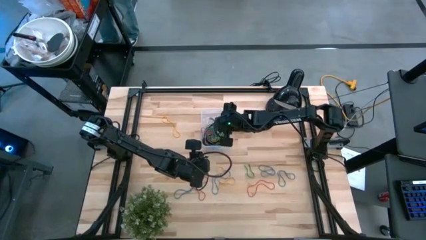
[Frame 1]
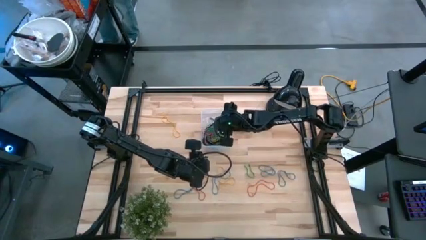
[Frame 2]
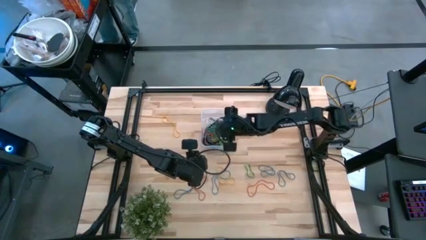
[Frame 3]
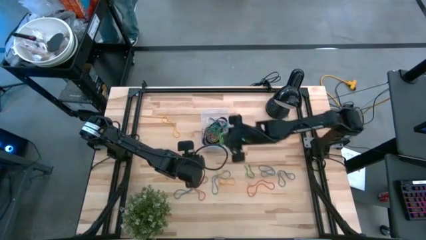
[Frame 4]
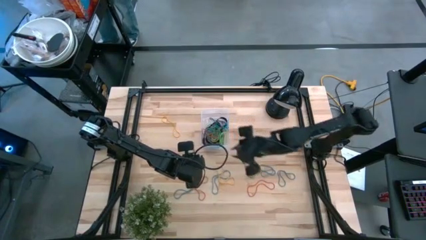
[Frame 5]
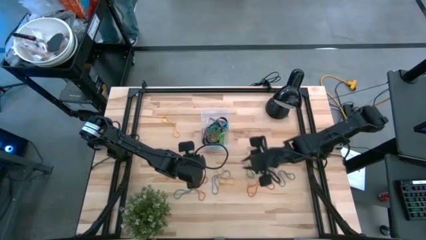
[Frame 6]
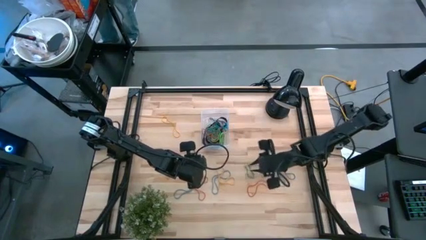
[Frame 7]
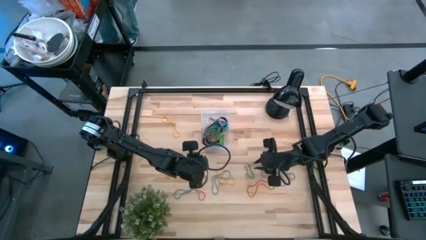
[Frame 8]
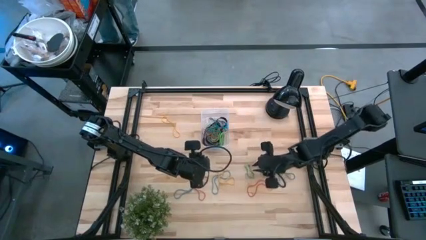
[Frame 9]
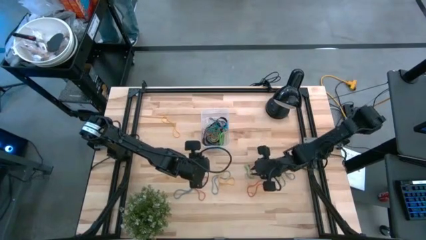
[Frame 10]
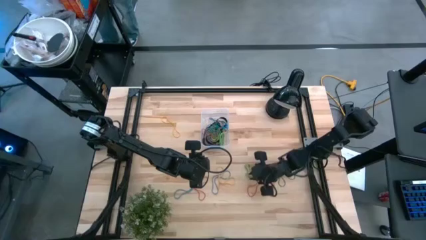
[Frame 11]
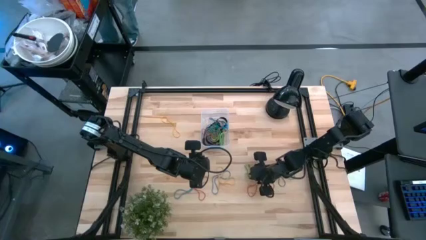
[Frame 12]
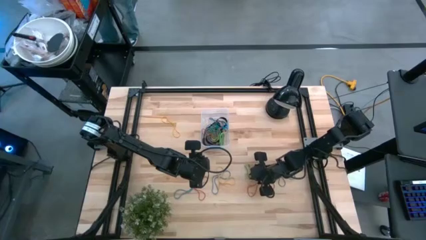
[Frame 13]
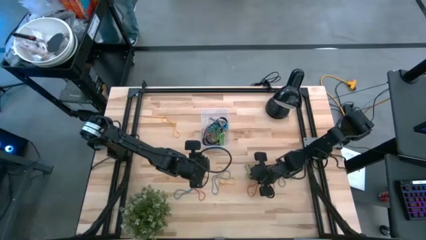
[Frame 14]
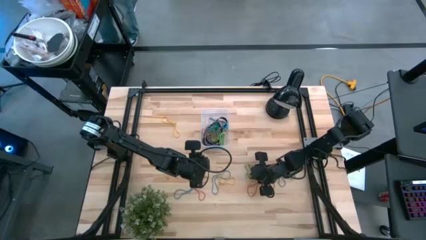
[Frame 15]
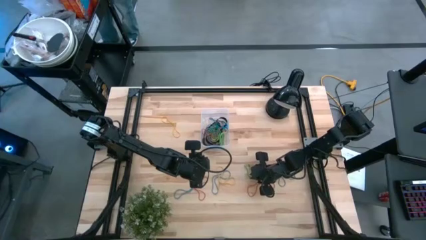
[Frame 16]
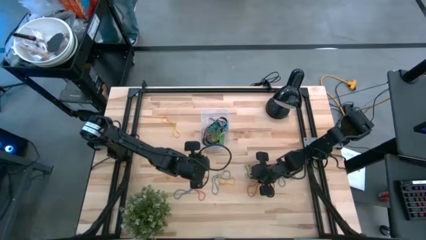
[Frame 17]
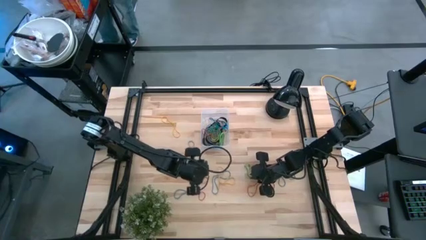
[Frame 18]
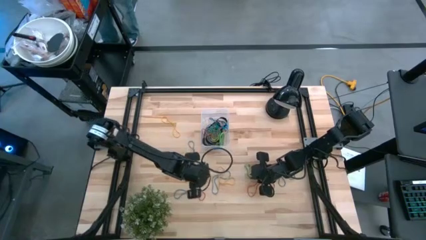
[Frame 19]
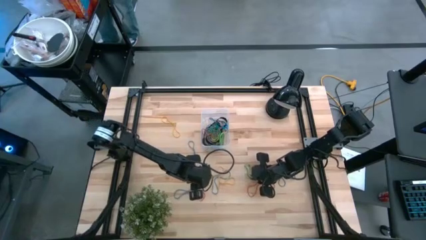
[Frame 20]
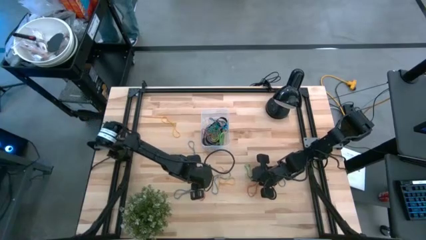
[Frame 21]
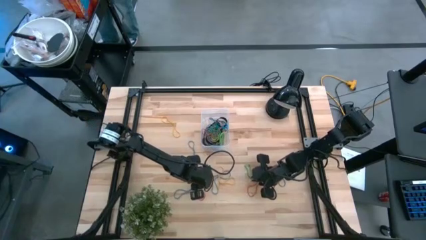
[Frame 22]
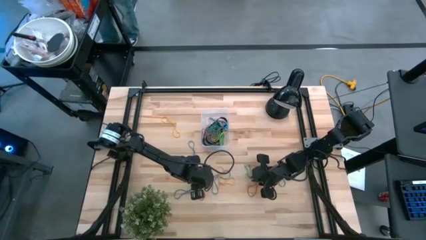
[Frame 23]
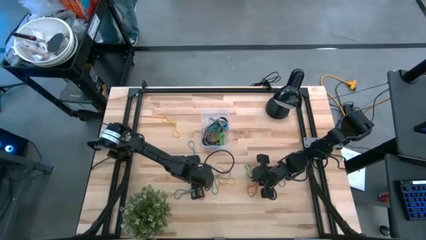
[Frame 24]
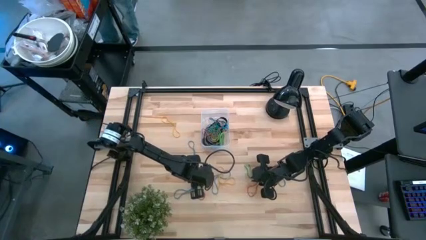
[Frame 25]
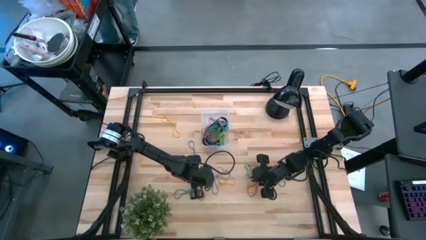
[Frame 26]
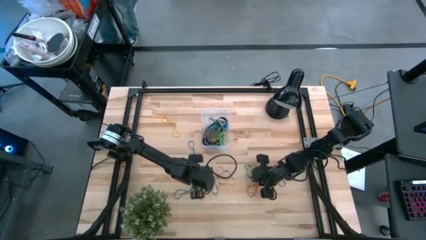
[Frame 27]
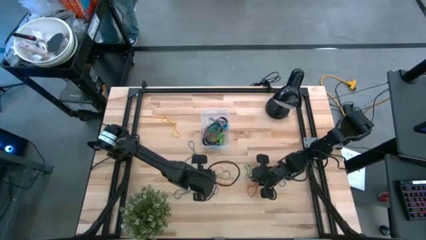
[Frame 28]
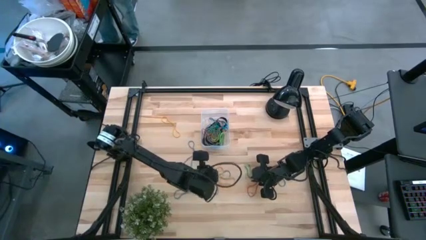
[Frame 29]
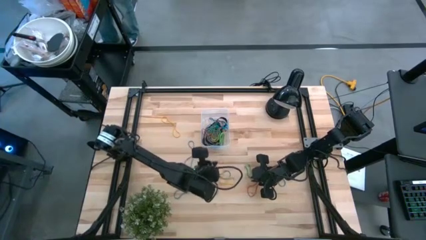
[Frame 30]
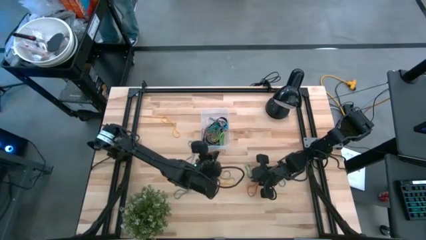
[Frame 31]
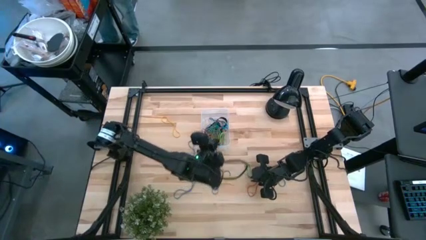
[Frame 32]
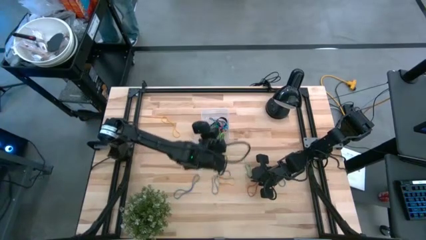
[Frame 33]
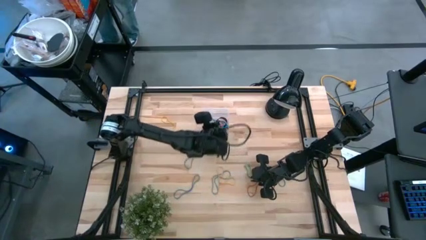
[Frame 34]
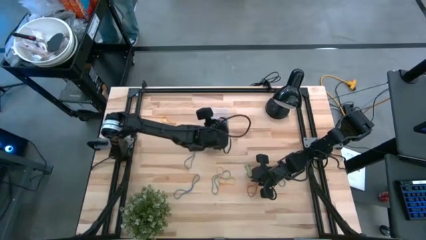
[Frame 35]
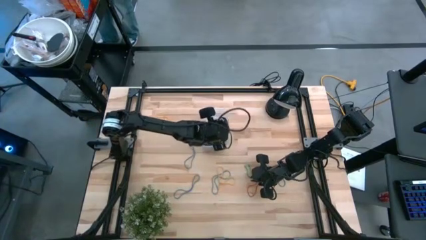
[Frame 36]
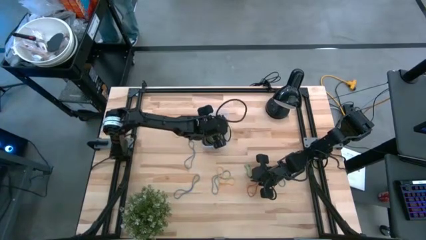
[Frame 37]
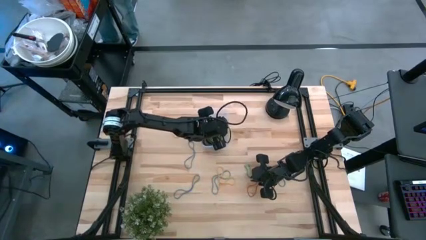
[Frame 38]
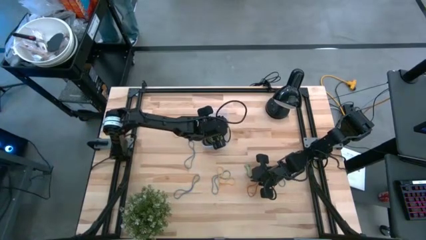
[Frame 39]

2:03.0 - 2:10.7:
Task: Pick and place rubber bands into bin
Put the red rubber band into the transparent bin

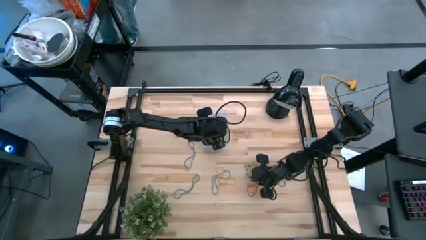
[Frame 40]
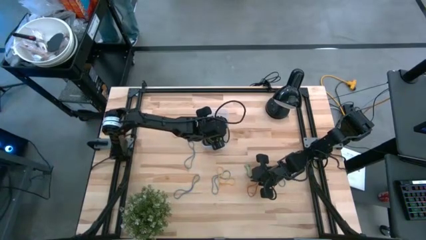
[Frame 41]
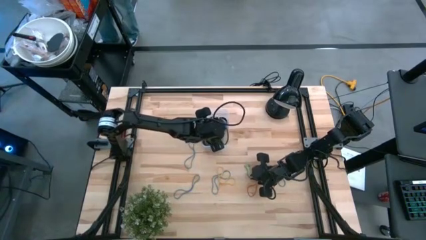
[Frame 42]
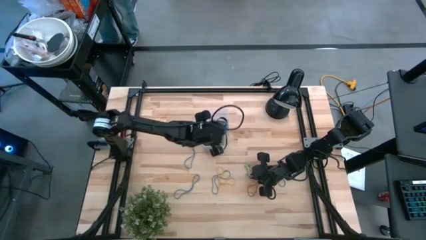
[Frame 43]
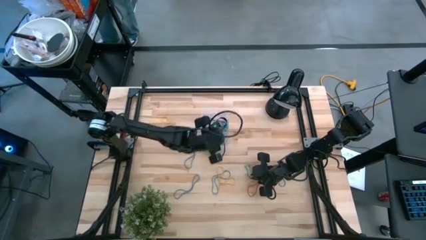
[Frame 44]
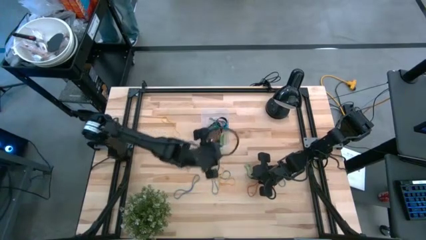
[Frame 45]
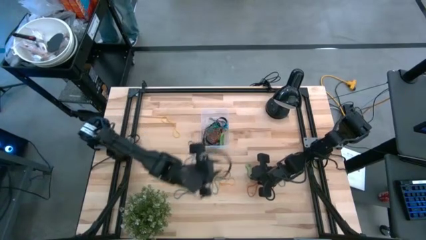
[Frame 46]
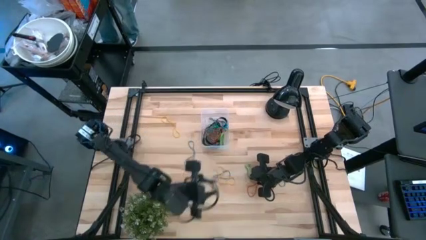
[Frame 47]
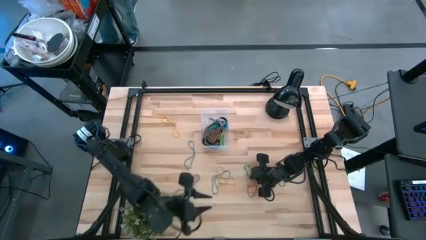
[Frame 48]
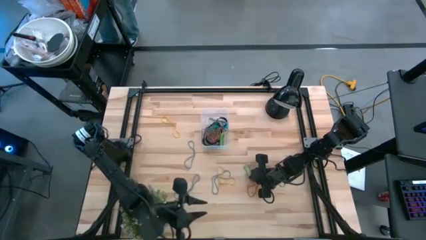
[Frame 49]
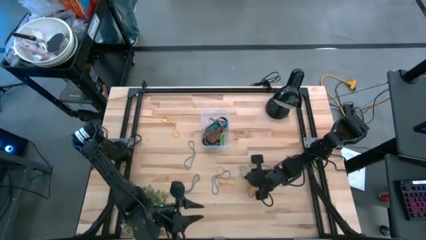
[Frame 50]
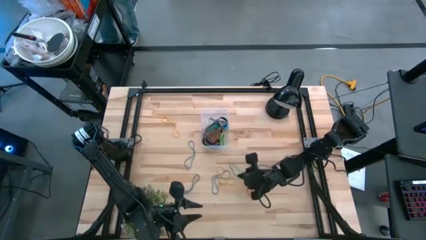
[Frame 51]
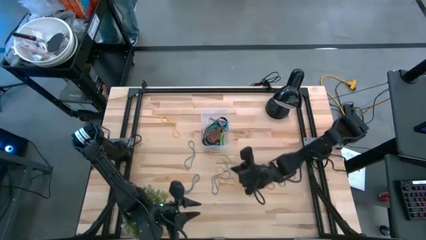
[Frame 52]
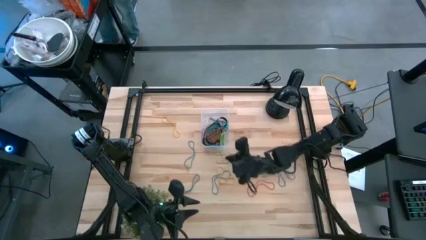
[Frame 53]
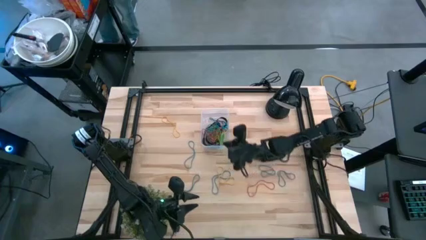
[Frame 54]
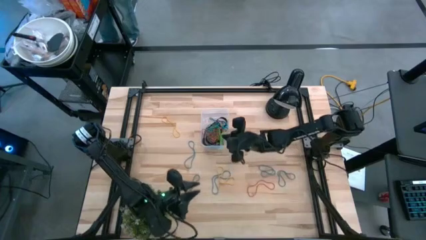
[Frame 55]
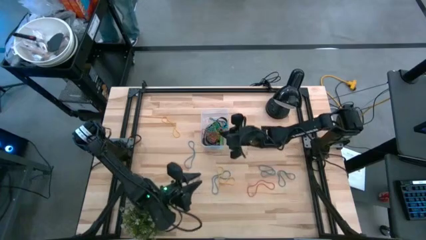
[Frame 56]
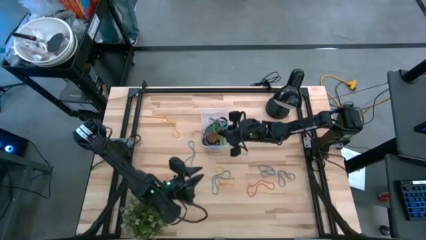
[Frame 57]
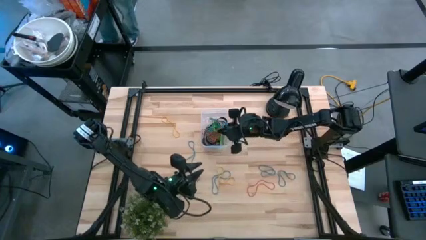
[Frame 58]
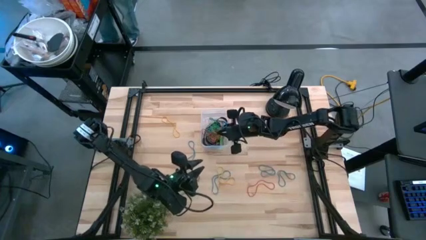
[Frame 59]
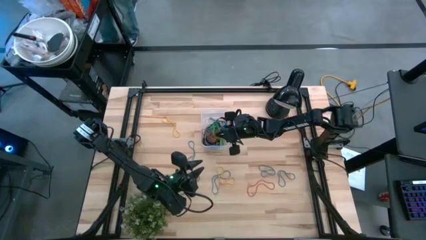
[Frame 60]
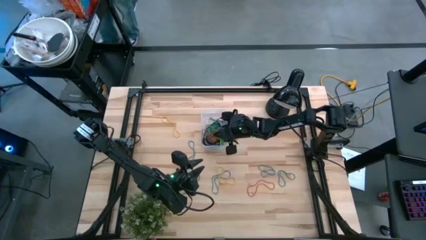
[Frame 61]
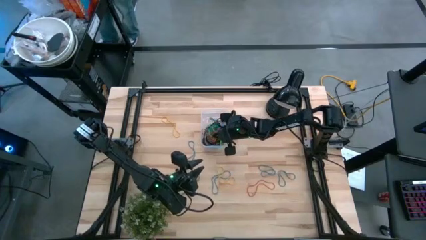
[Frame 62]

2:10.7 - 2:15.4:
Put the green rubber band into the transparent bin

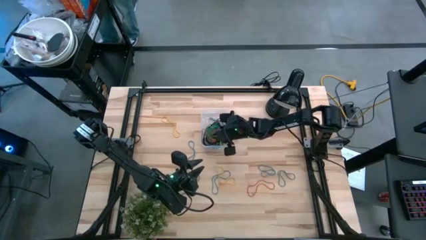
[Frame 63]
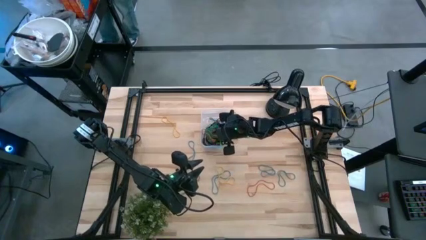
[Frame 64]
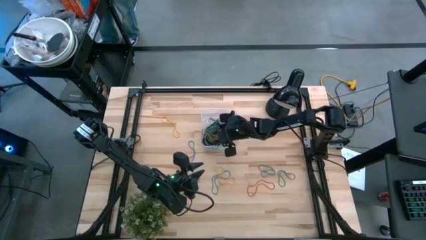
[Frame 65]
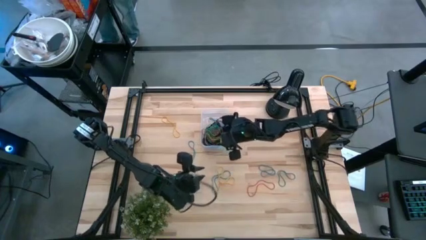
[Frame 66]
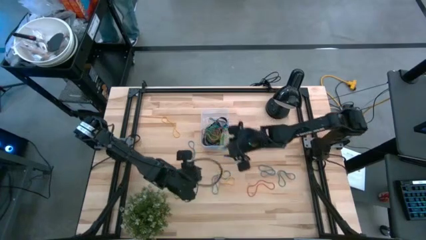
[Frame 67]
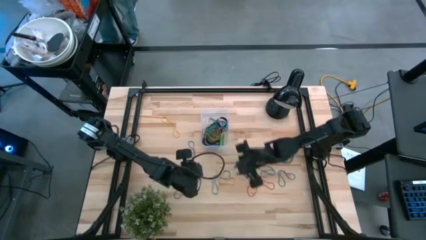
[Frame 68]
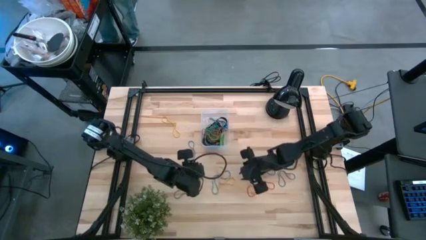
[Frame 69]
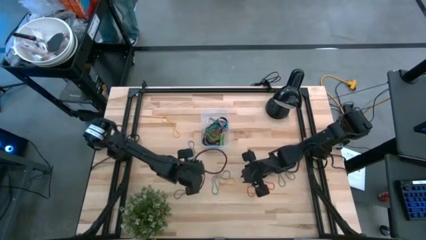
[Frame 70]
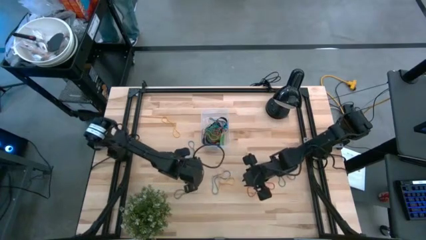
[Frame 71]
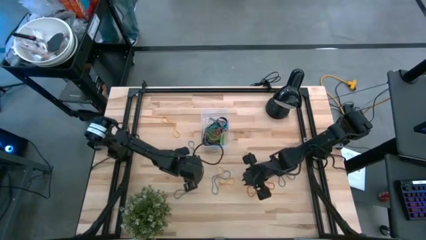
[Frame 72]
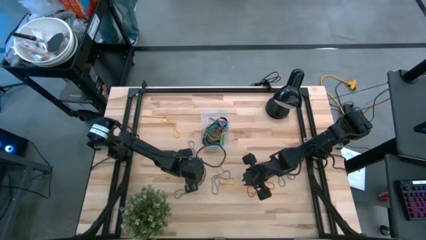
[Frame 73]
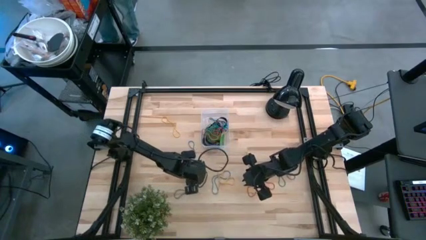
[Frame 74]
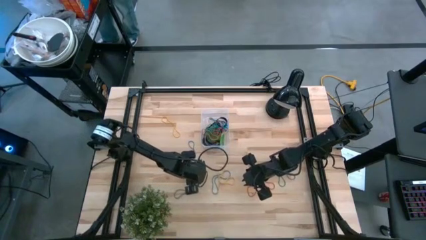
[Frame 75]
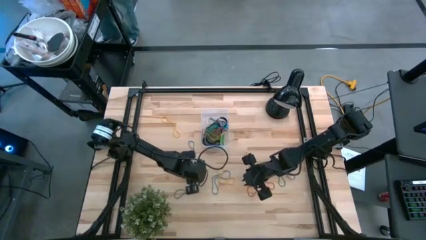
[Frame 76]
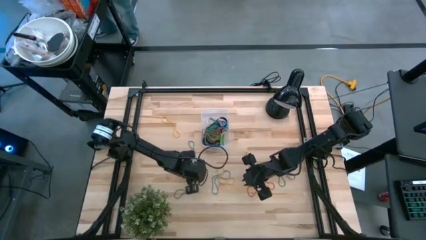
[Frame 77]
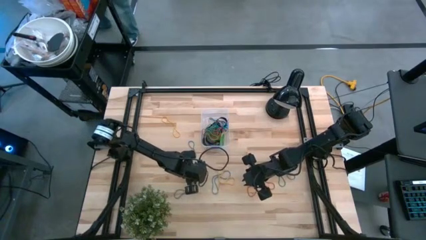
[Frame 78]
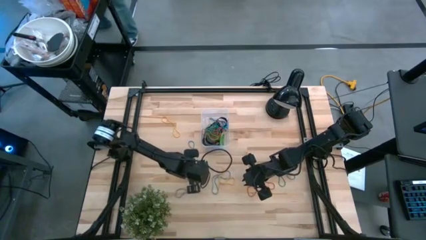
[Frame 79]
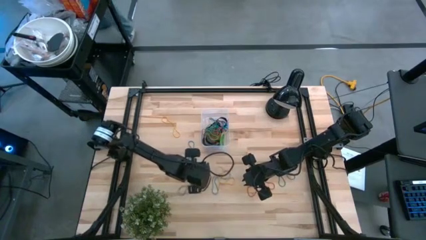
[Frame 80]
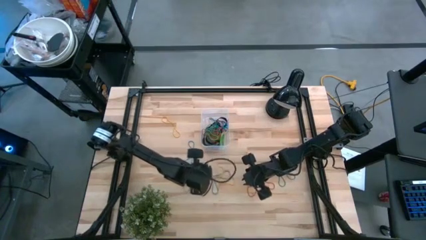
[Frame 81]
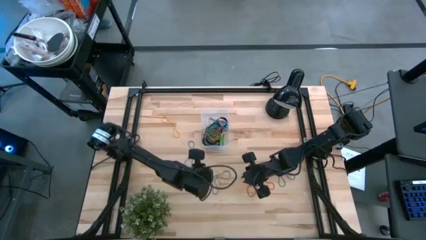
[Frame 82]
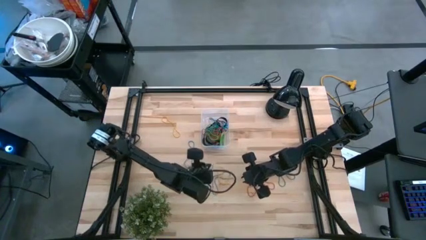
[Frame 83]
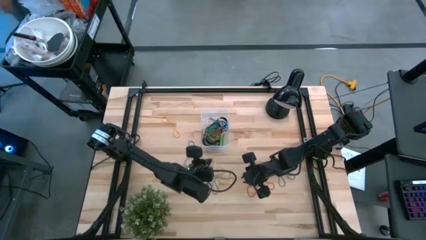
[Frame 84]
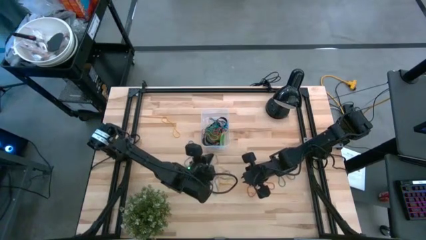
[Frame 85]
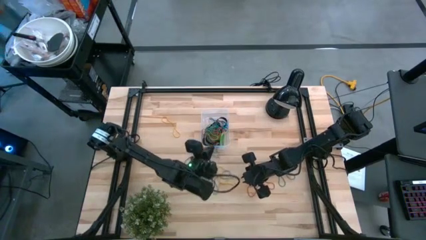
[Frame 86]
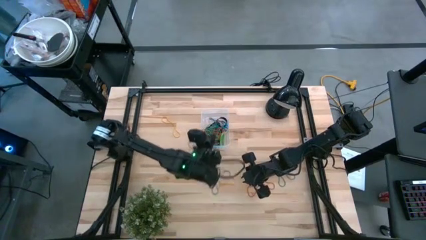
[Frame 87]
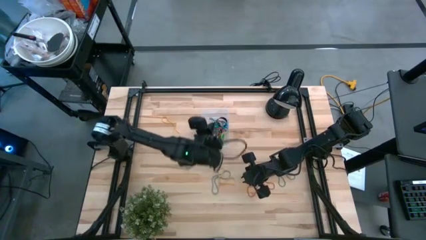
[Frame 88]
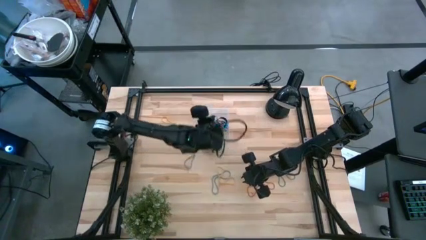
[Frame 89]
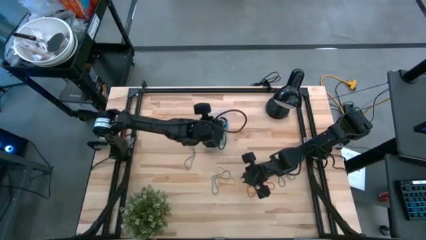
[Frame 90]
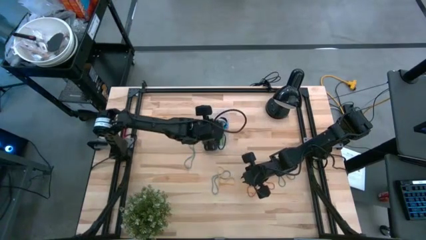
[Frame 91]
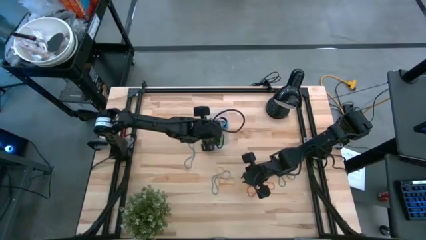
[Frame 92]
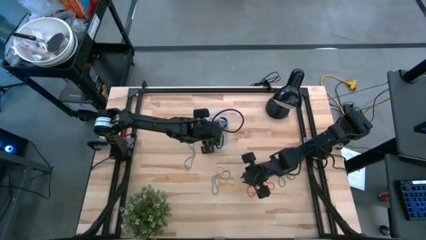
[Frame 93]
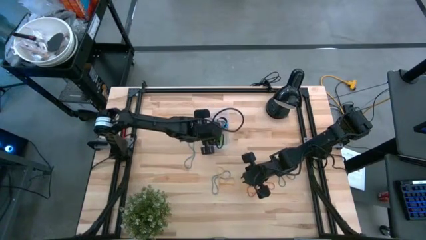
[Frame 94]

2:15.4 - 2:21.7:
Put the blue rubber band into the transparent bin
